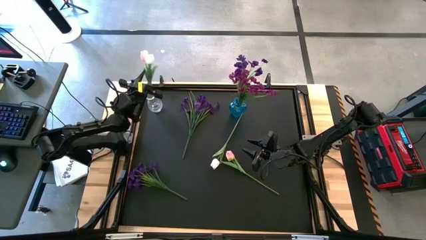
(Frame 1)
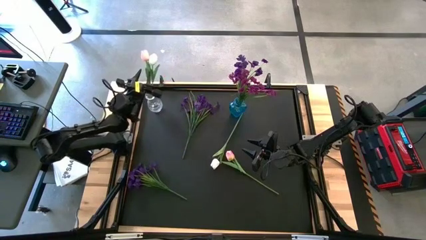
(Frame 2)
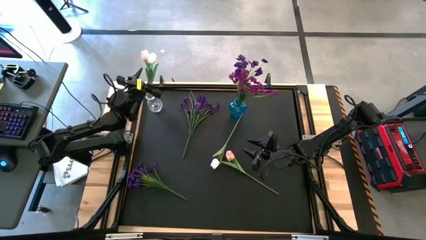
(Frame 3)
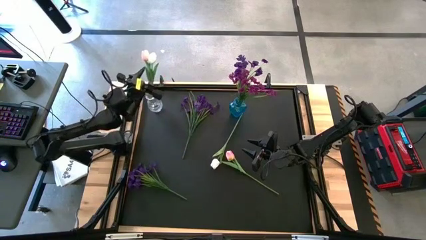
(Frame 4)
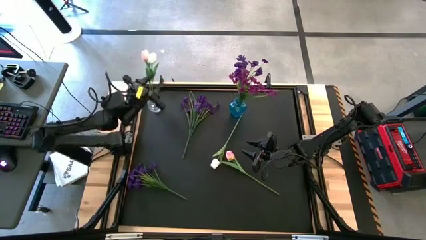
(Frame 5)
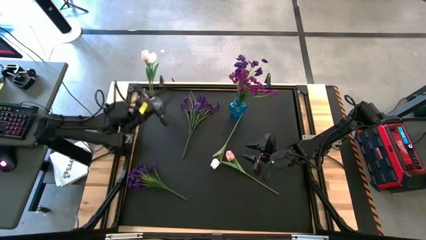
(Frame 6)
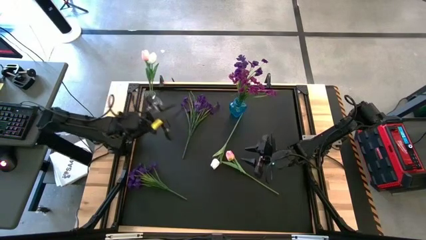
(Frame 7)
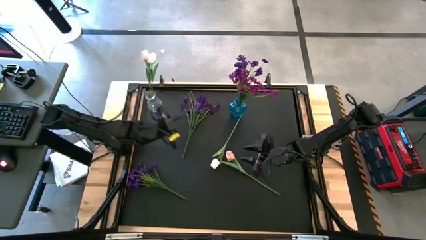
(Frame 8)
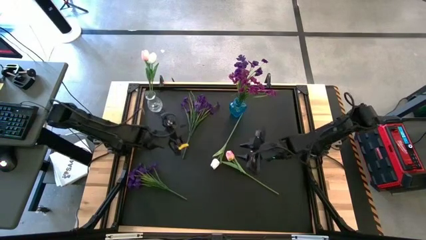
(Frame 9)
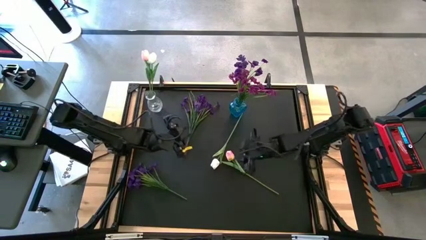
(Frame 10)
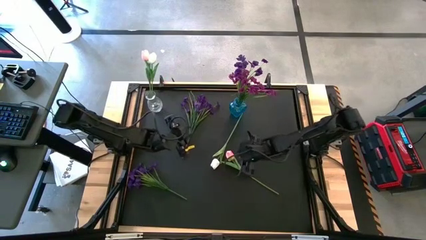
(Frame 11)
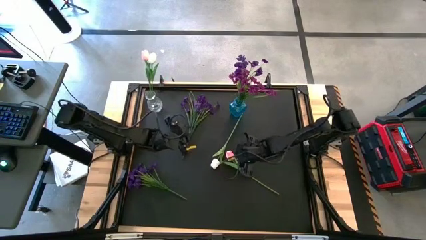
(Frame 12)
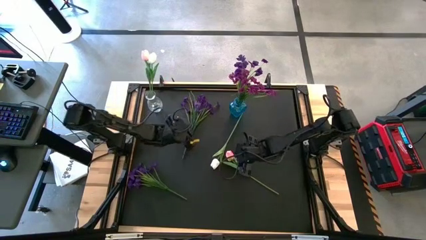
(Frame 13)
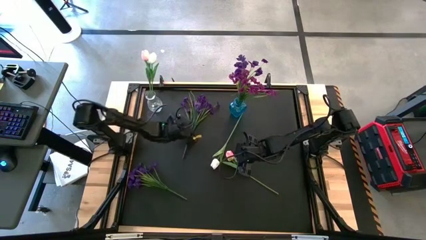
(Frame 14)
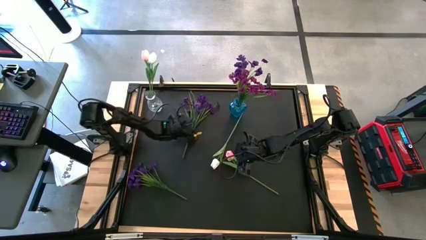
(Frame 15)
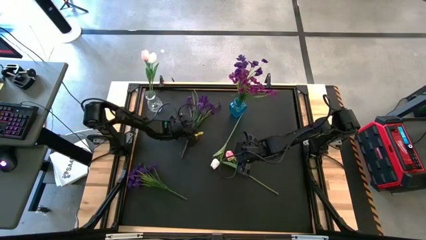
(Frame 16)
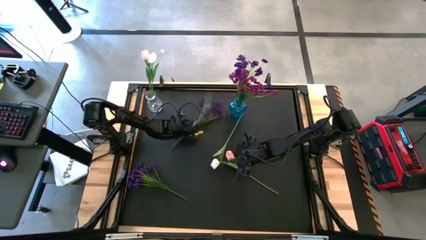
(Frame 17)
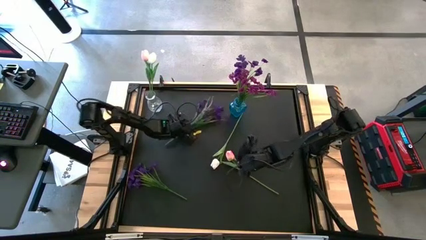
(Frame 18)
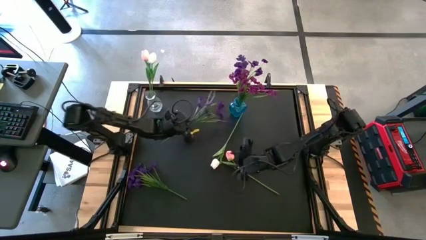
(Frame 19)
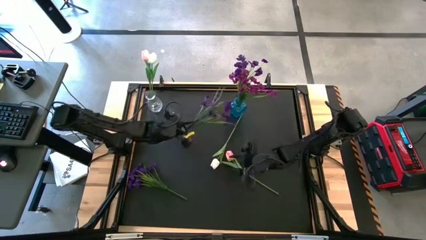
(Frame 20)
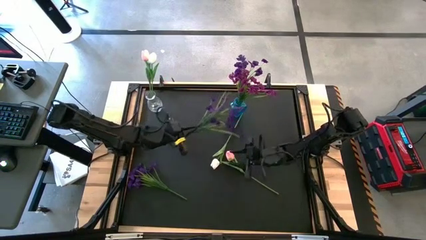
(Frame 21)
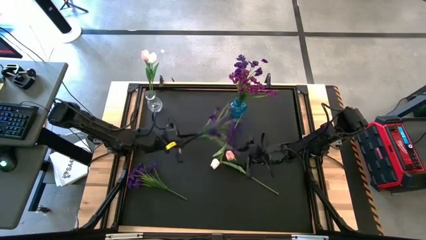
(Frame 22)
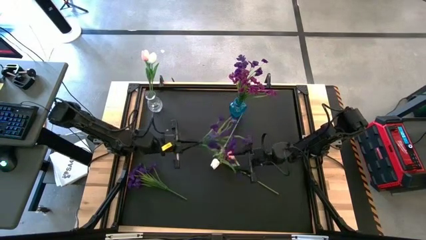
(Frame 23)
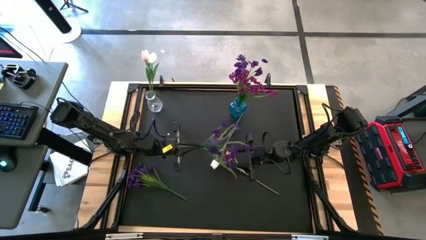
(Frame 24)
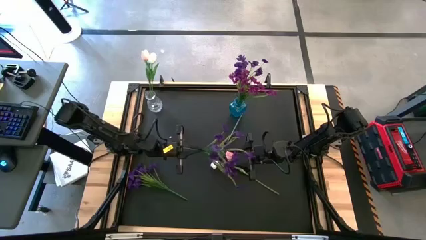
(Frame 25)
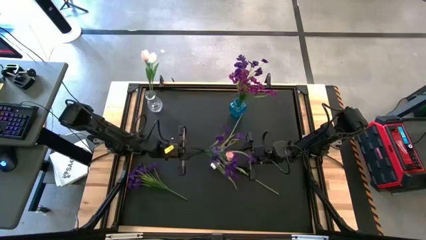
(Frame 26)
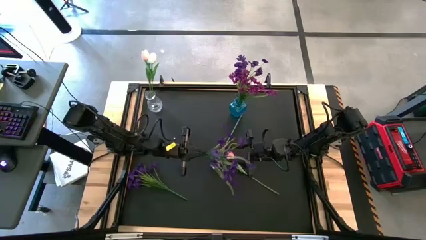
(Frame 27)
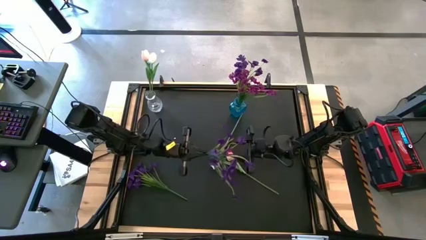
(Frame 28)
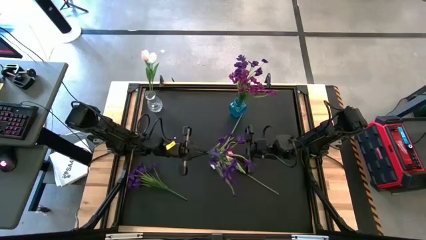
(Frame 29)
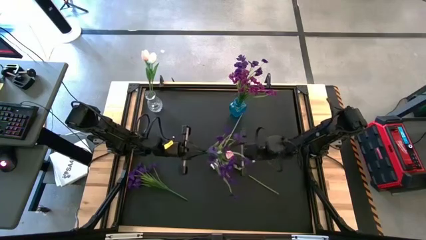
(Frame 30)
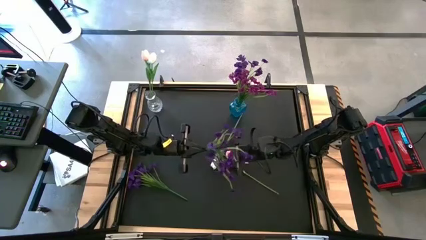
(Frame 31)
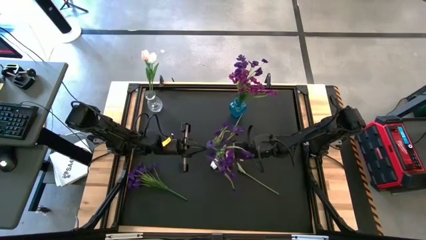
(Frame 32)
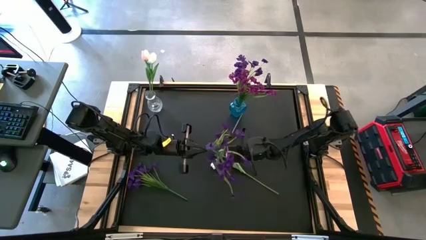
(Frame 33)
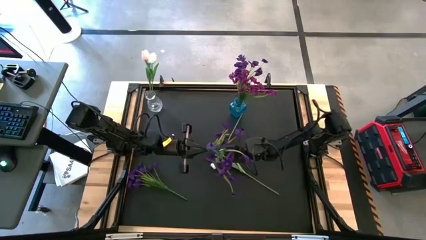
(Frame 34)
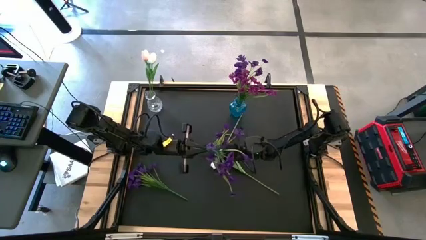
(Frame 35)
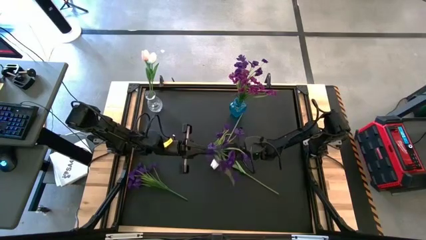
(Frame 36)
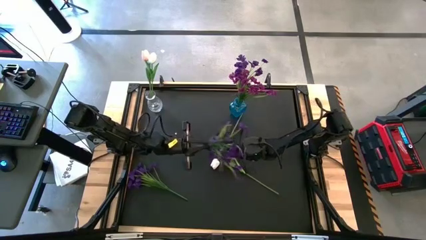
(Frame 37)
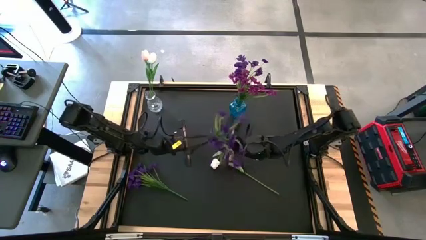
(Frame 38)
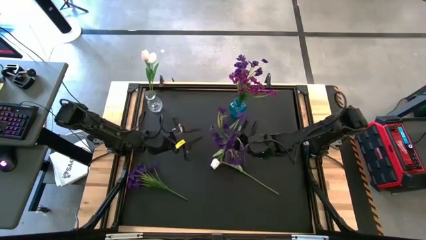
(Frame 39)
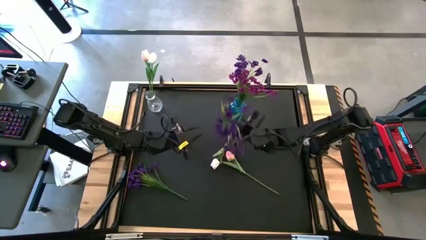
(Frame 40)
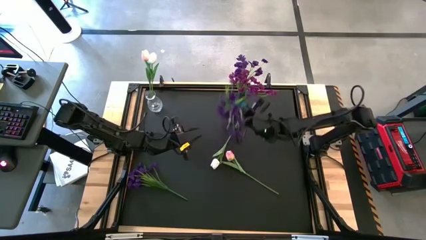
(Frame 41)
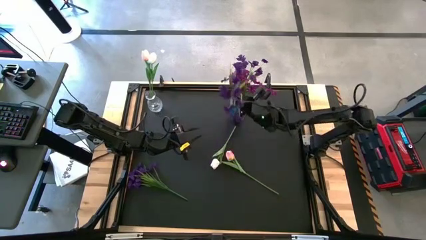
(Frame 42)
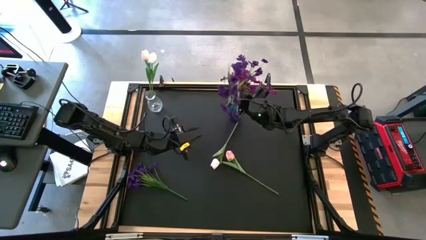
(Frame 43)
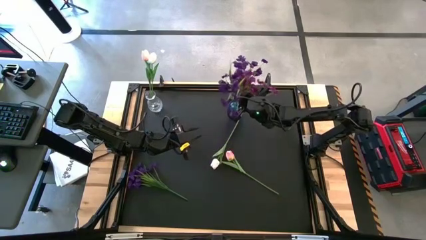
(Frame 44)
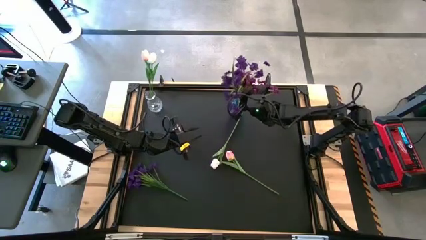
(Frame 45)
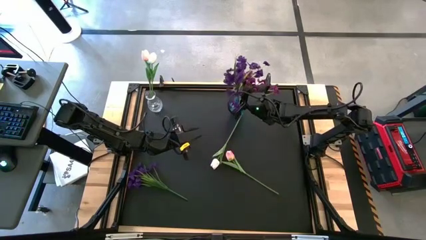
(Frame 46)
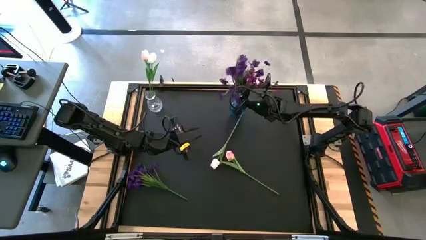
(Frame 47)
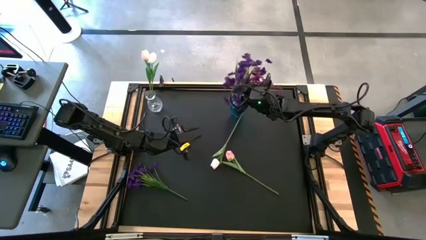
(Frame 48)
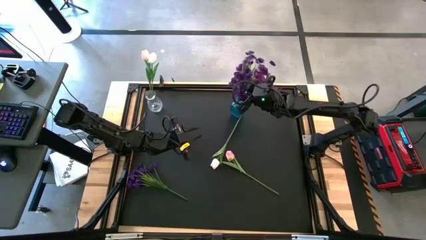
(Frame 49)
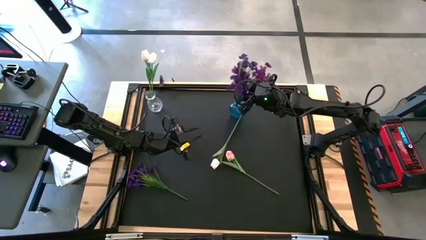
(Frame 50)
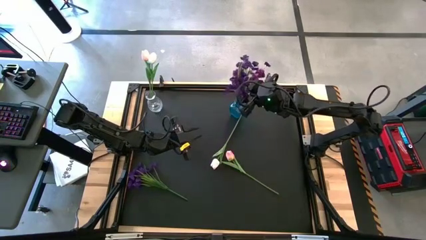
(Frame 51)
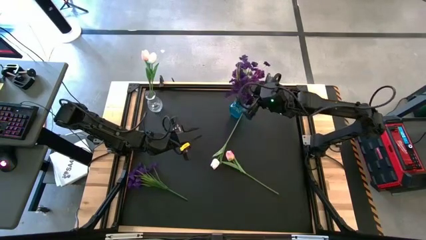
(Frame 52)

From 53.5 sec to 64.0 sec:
Task: Sort flowers into vase by color
Put the top violet flower into the blue vase
